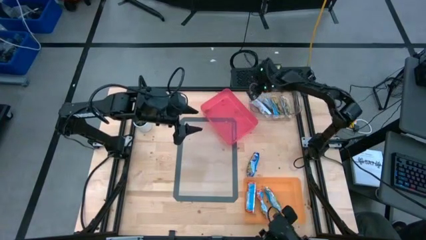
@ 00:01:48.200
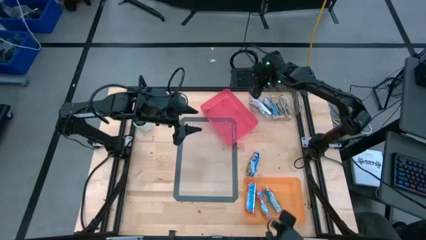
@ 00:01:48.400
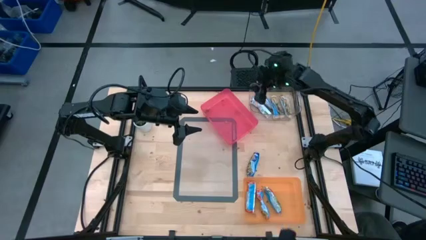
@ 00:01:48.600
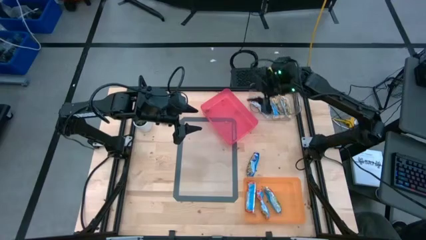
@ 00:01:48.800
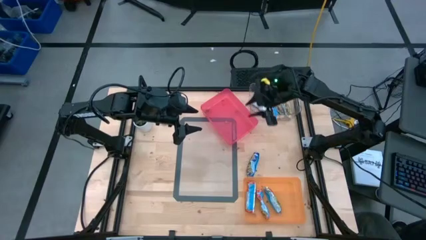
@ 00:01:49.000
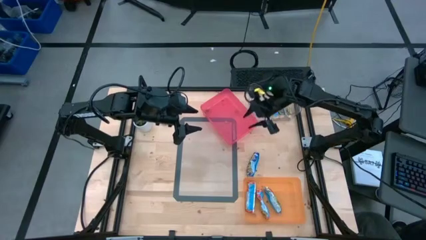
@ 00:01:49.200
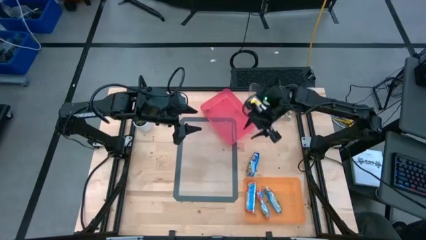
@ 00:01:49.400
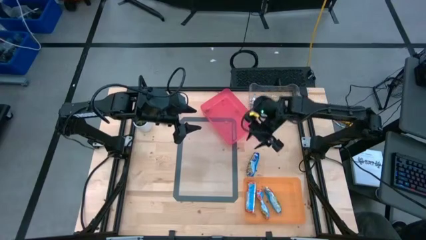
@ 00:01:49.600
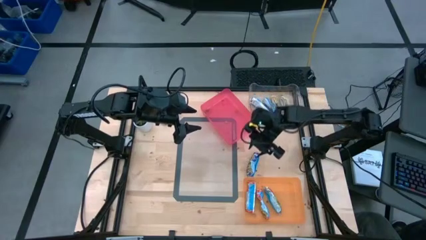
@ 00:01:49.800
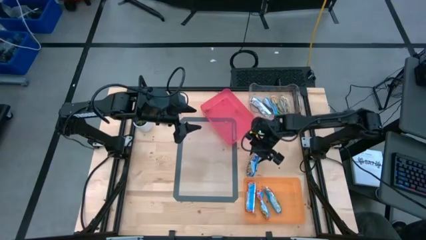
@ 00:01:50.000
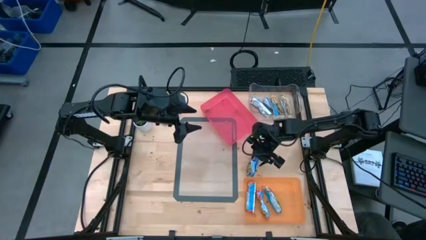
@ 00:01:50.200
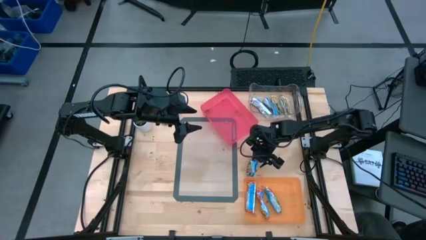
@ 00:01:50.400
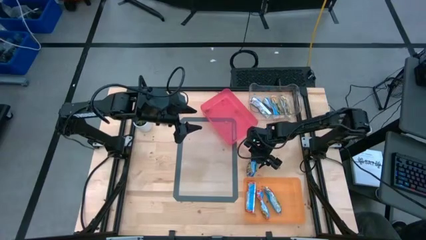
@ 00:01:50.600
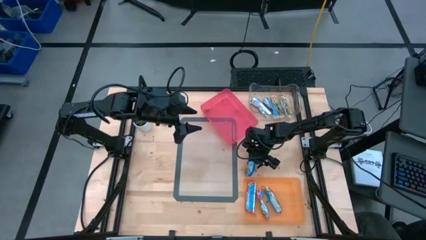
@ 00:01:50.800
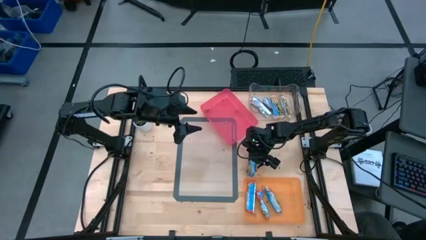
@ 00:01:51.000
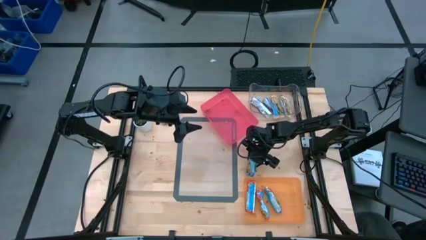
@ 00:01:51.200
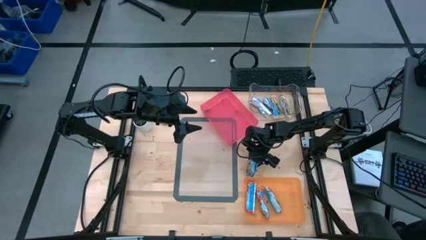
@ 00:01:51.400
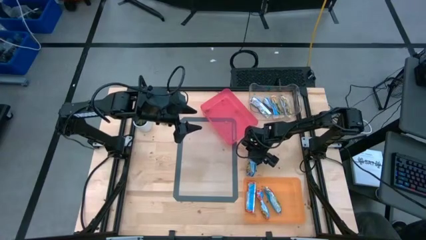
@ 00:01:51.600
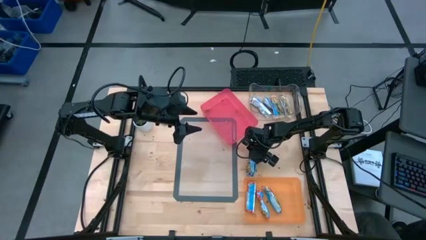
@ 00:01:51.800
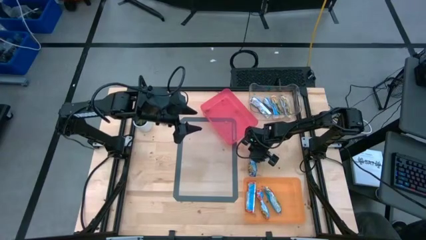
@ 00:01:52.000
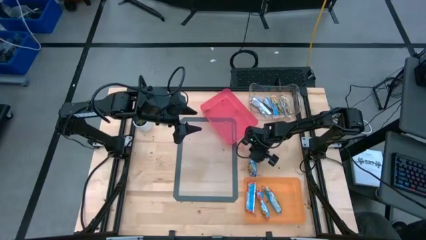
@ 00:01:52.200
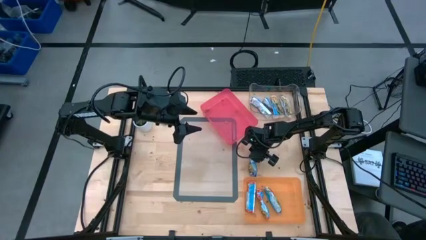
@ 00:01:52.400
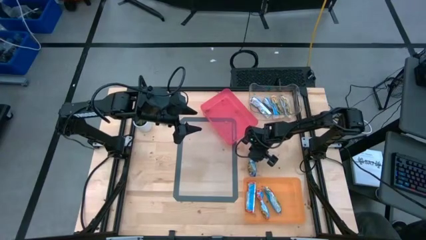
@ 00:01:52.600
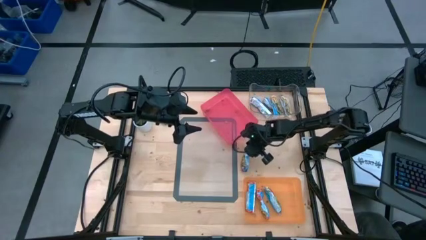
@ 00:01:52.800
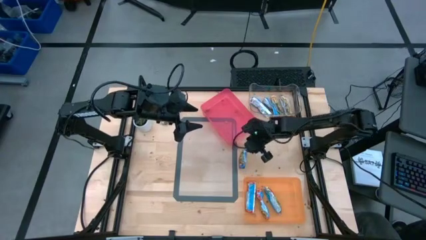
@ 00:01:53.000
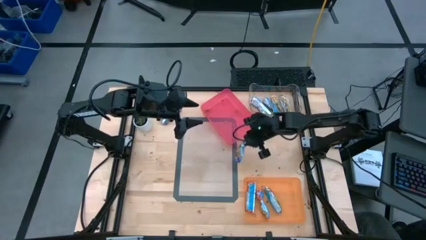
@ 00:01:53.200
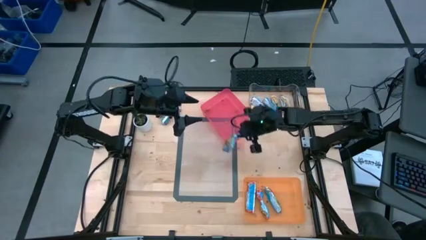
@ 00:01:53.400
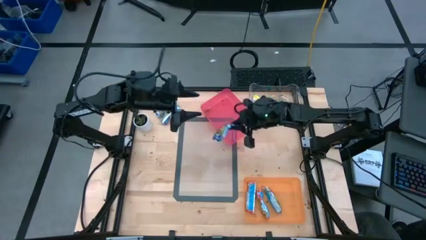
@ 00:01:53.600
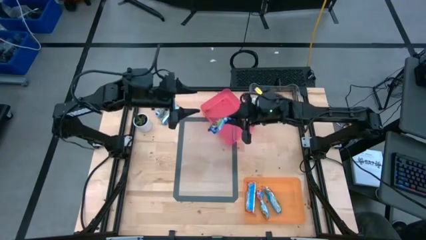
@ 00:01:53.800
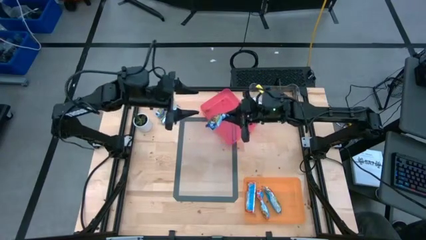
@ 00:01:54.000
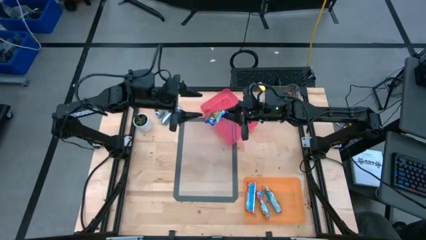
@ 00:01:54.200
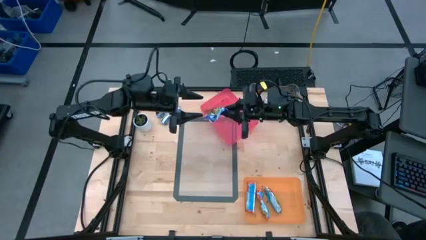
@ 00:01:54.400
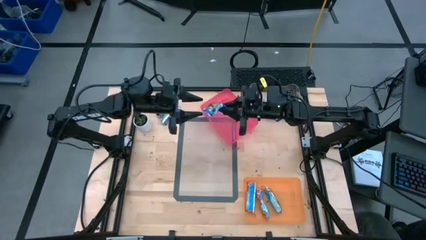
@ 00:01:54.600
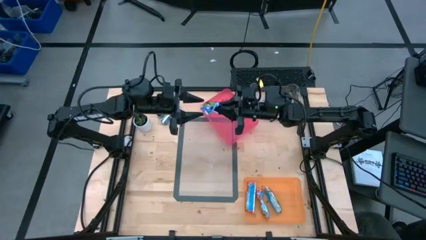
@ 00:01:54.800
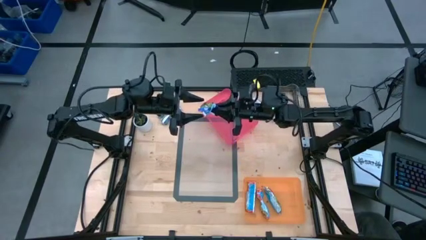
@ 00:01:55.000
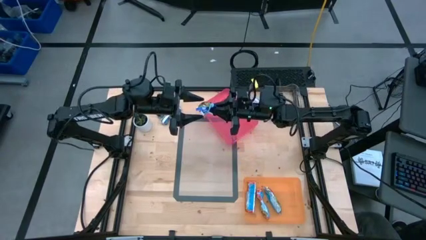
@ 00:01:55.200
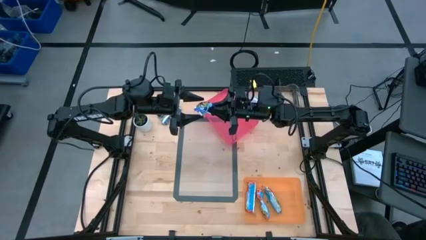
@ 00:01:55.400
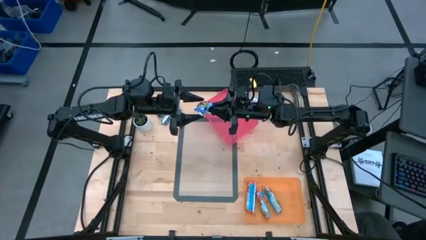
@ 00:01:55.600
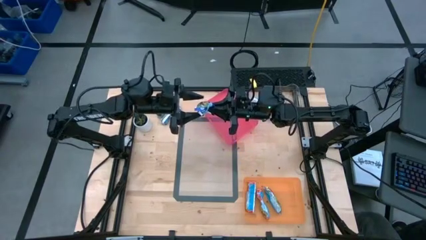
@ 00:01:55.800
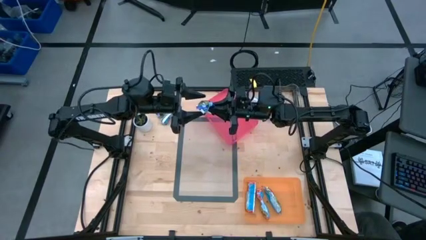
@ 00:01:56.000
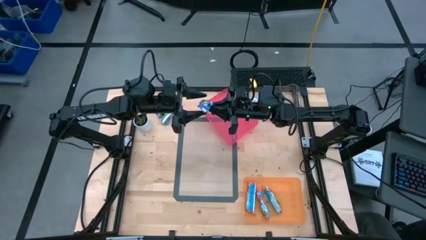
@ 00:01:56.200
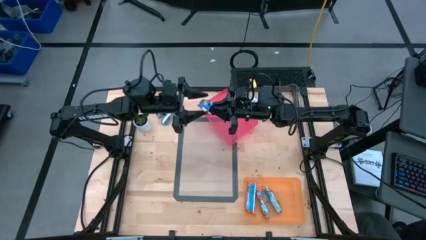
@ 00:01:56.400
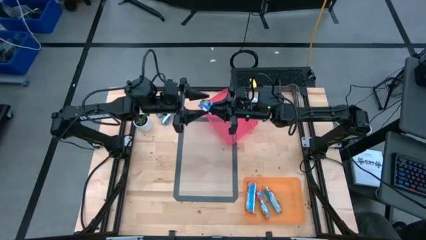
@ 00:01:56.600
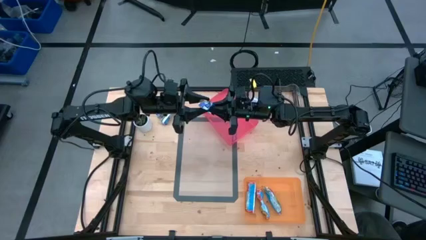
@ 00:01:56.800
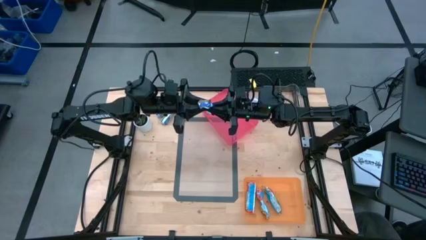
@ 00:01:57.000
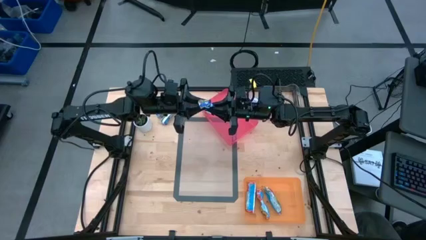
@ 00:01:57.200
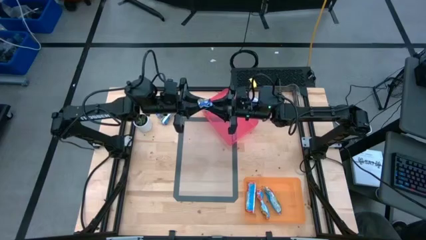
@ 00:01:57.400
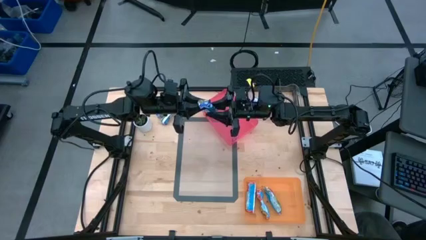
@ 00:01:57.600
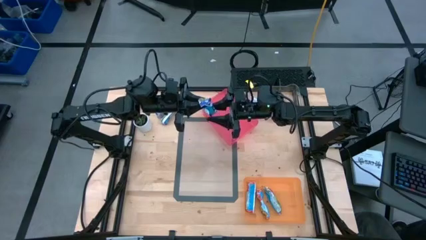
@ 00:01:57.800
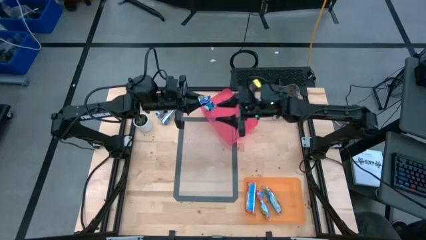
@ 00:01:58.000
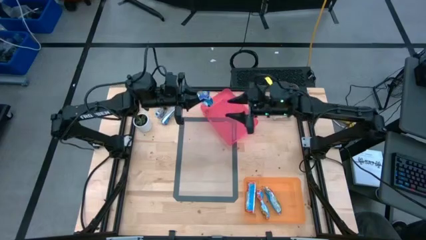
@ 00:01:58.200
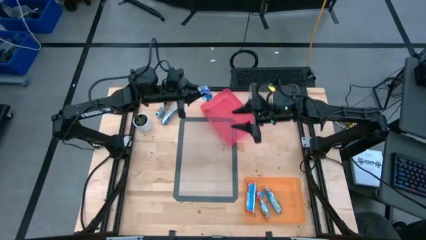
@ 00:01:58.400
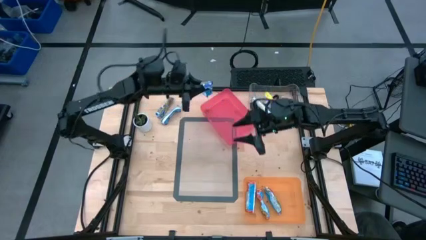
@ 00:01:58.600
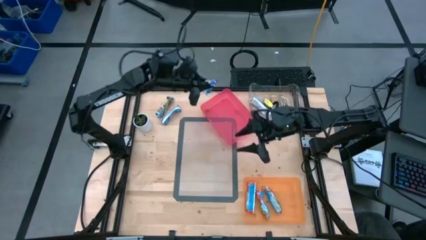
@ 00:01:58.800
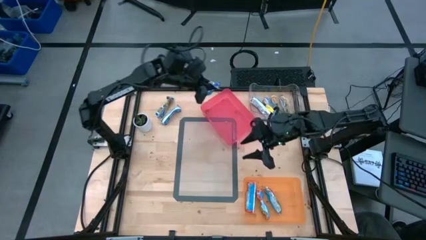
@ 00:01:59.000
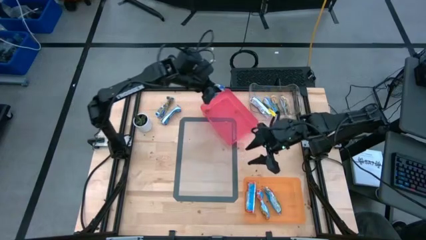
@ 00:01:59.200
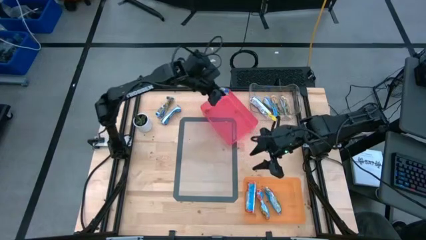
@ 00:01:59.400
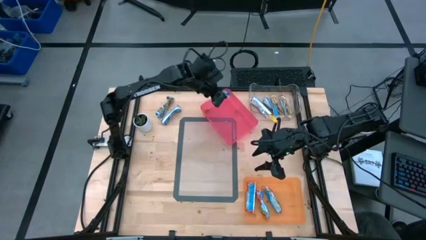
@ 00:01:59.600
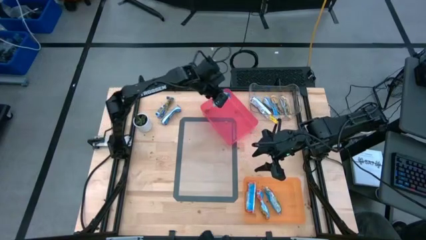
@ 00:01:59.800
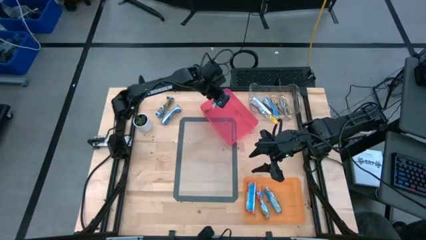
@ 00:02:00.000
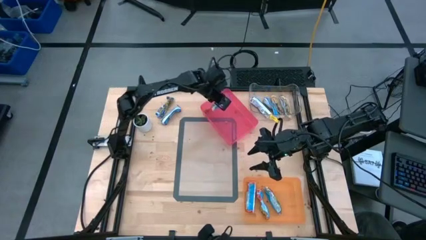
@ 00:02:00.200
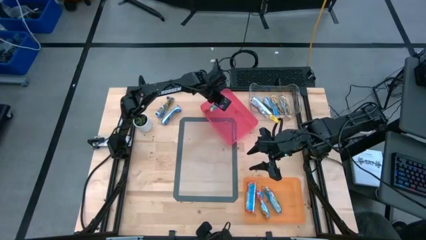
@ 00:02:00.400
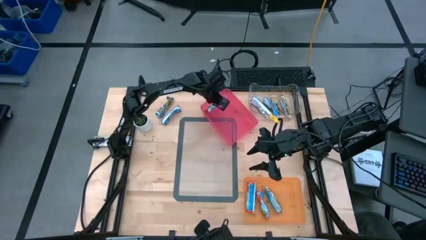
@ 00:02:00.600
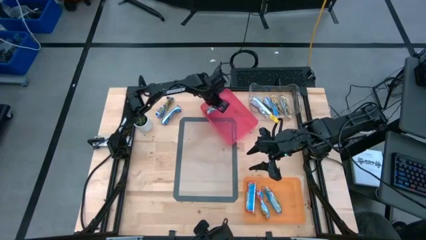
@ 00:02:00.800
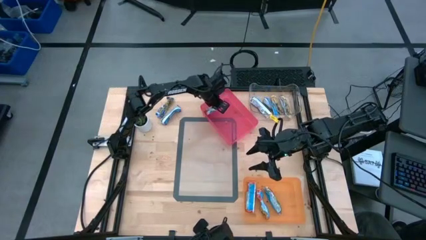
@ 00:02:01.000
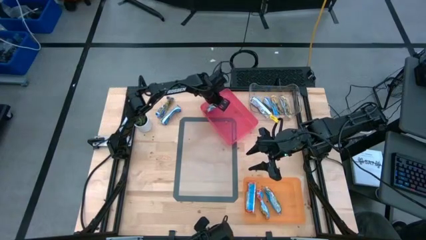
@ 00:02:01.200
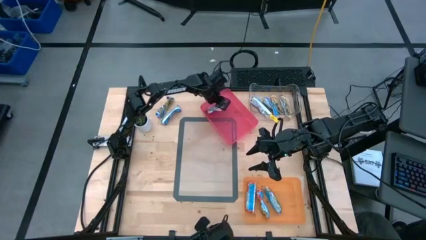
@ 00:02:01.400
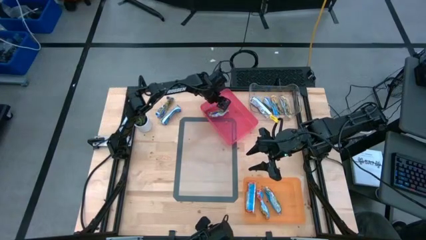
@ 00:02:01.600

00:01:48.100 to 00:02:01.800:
Task: Pick and place Granola Bars by type
Put the blue granola bar into the pink bin

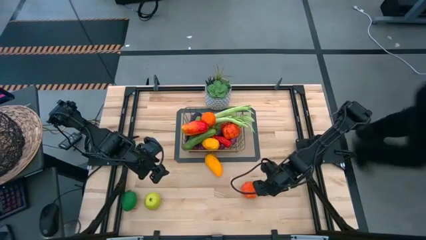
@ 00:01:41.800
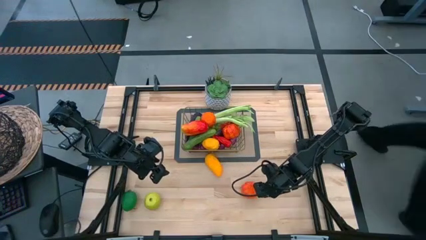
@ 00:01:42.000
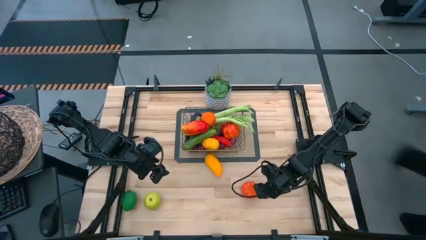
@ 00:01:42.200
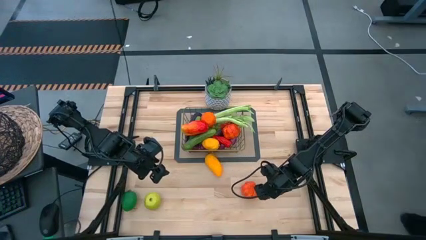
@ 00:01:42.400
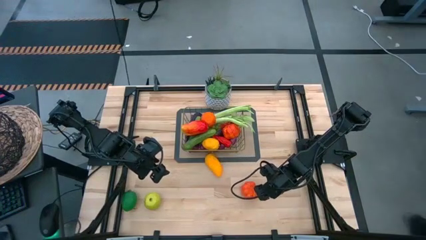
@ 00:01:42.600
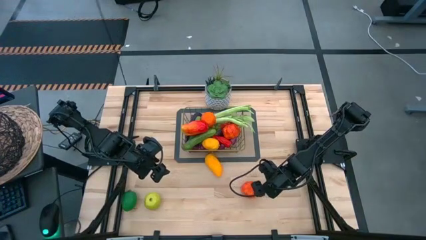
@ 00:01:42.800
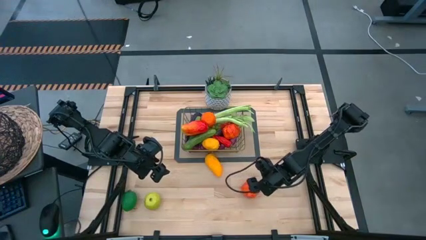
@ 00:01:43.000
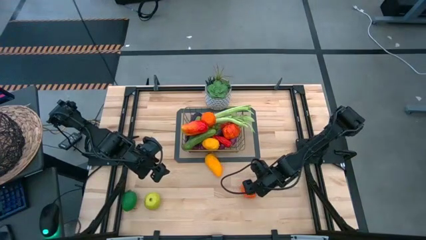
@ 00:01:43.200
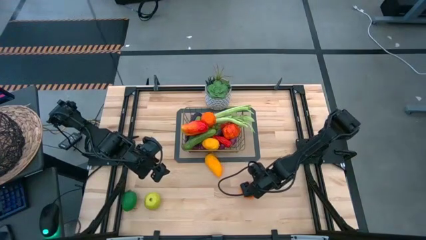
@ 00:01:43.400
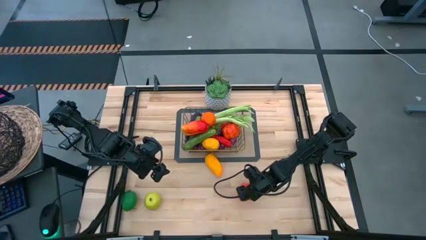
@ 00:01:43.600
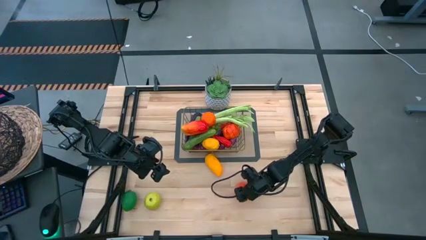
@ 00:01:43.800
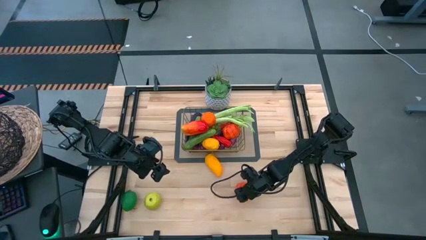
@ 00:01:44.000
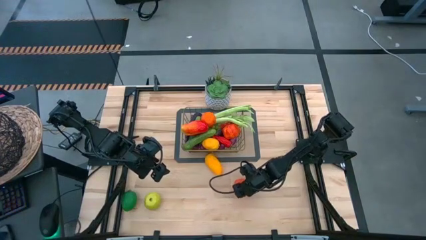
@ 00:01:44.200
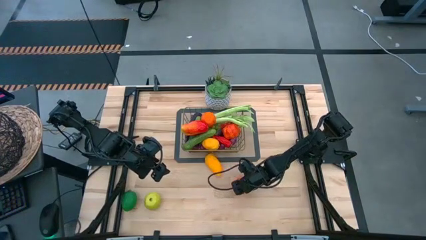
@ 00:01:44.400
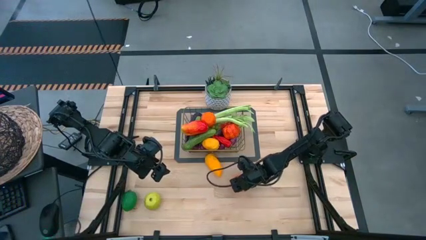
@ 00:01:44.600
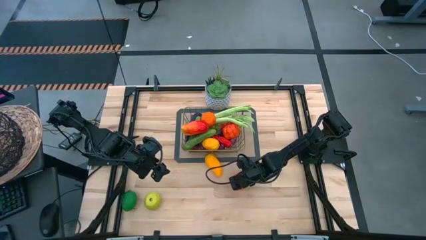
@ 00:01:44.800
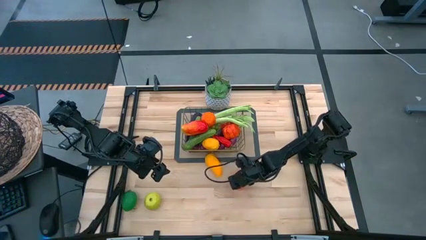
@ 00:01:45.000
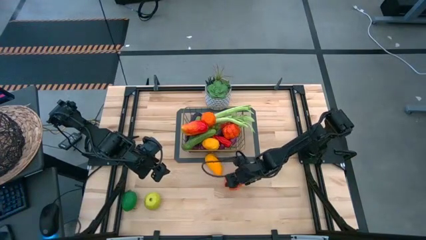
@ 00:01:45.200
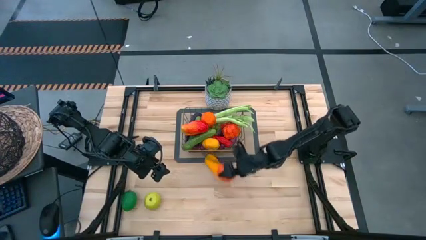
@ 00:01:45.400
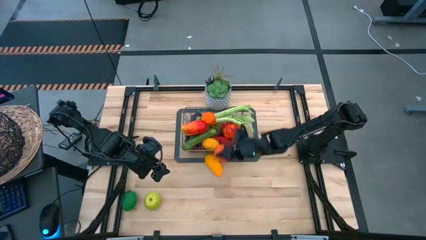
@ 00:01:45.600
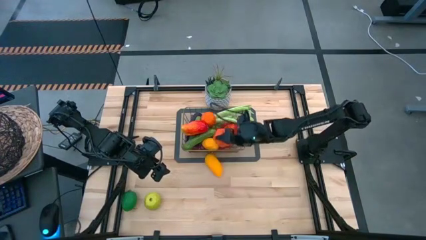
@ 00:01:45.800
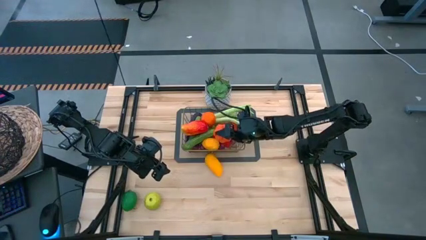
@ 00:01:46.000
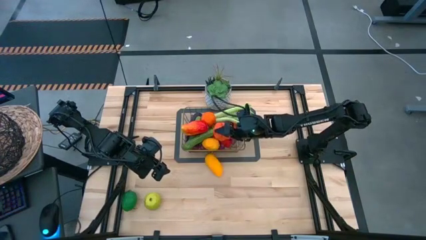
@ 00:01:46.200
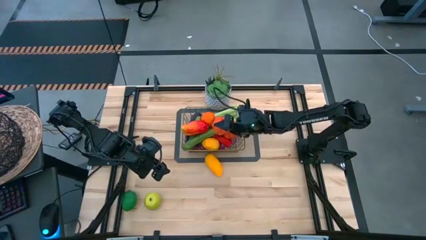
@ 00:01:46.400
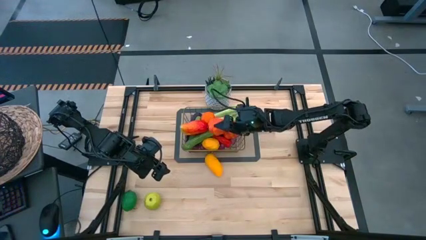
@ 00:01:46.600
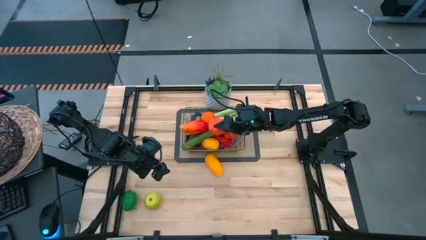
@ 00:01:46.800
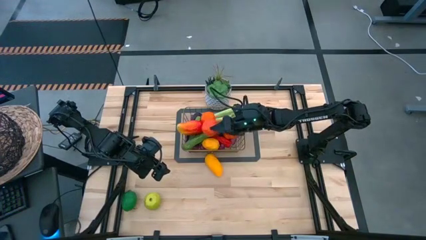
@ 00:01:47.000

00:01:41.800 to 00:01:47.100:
Task: Build produce basket
Put the pumpkin into the wire basket
